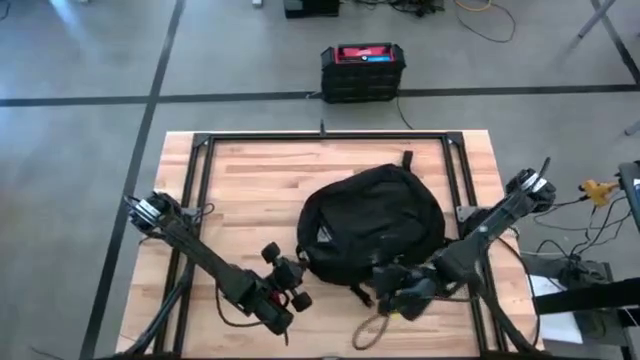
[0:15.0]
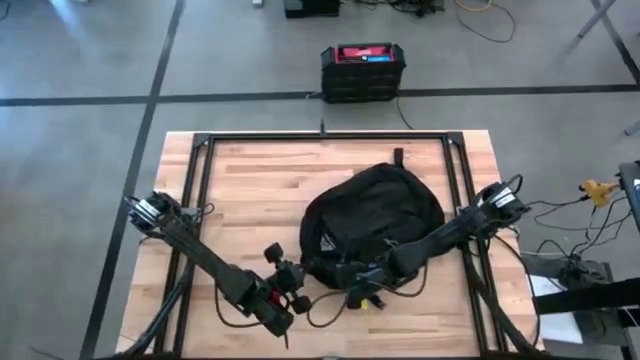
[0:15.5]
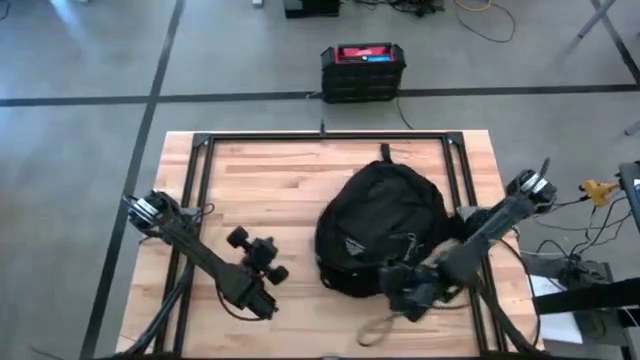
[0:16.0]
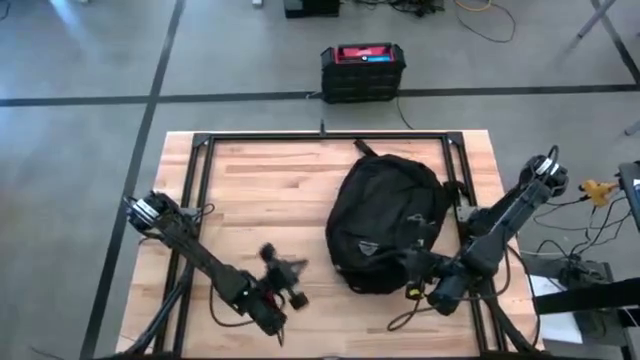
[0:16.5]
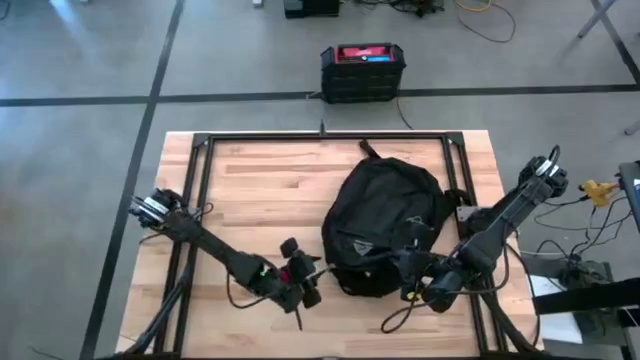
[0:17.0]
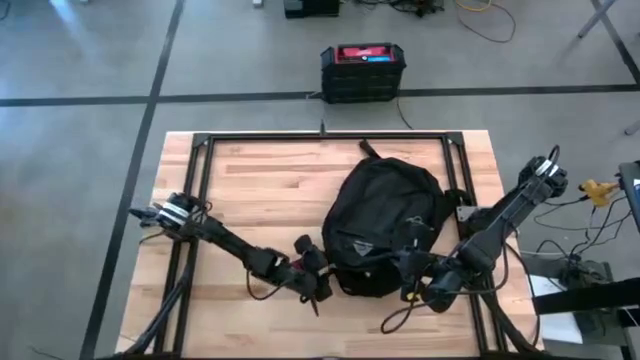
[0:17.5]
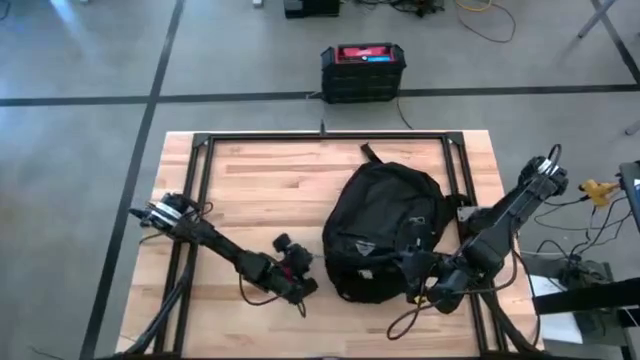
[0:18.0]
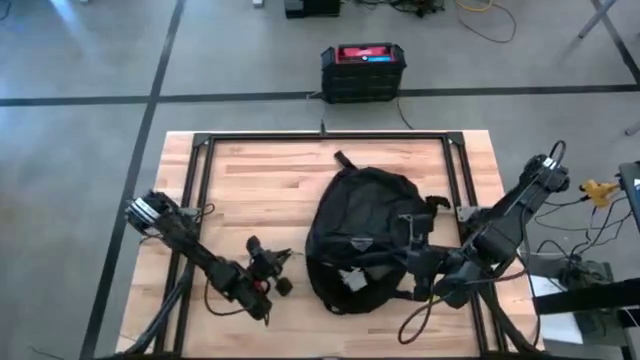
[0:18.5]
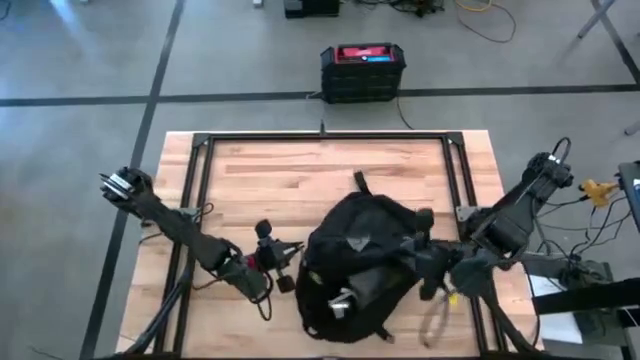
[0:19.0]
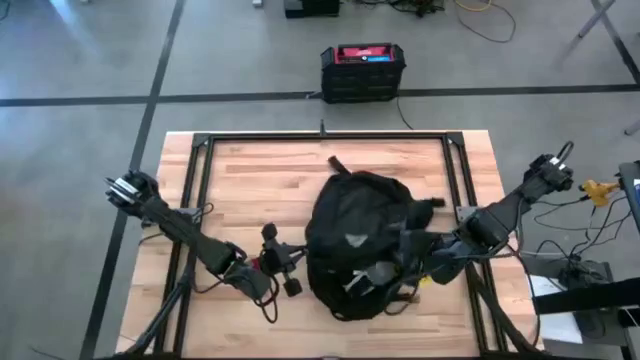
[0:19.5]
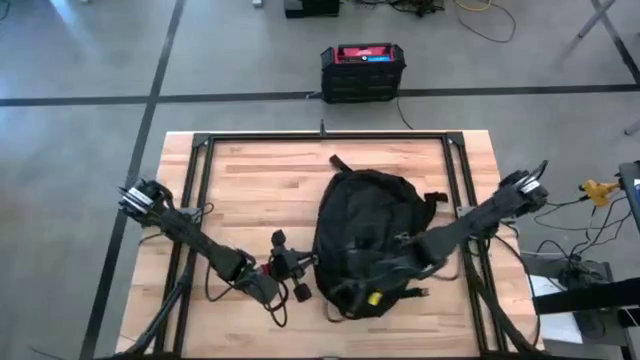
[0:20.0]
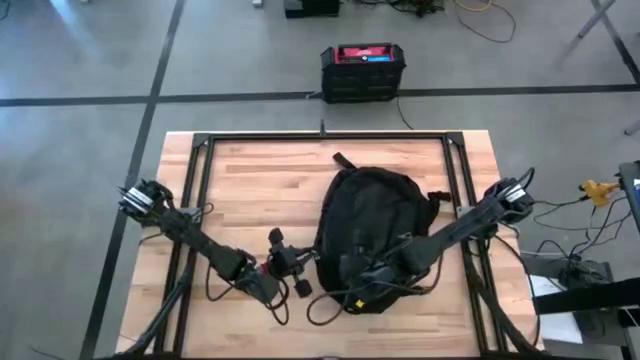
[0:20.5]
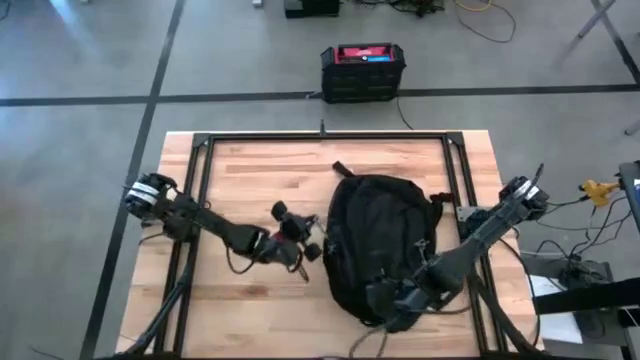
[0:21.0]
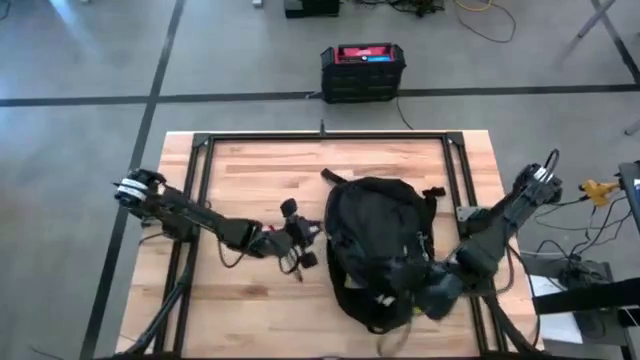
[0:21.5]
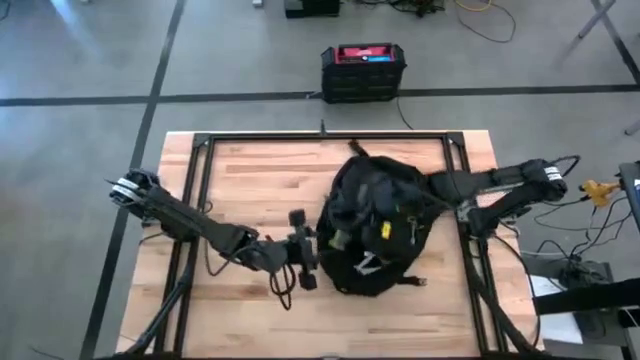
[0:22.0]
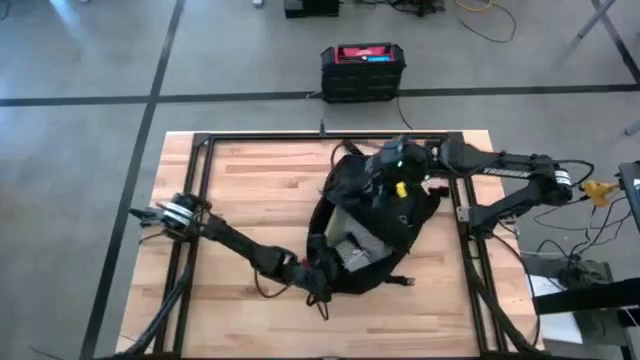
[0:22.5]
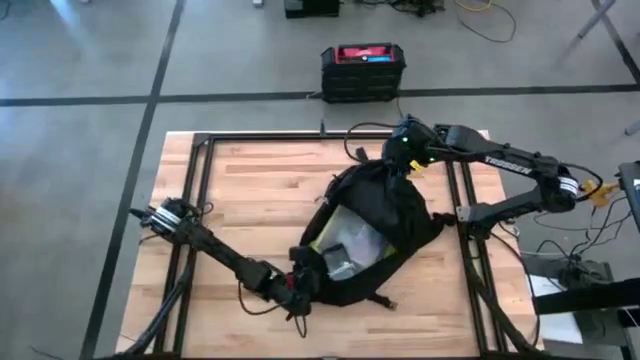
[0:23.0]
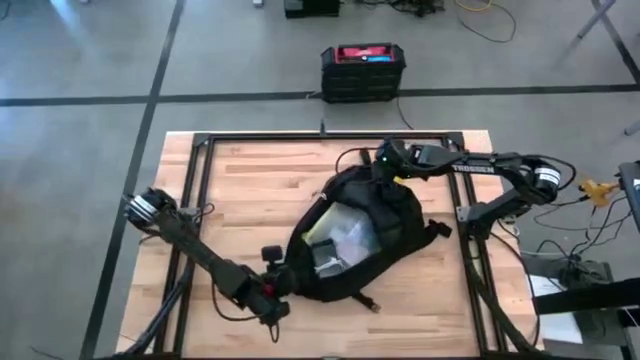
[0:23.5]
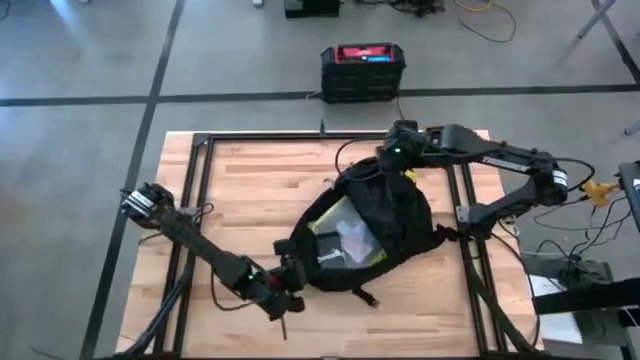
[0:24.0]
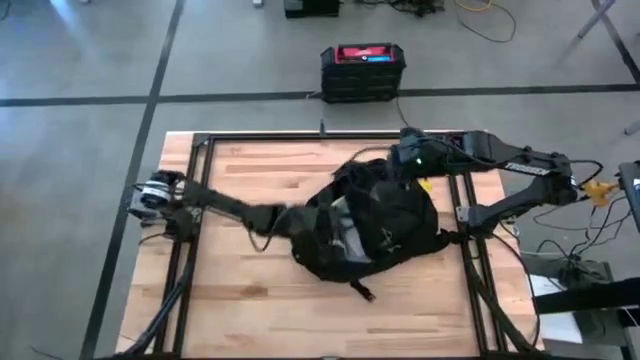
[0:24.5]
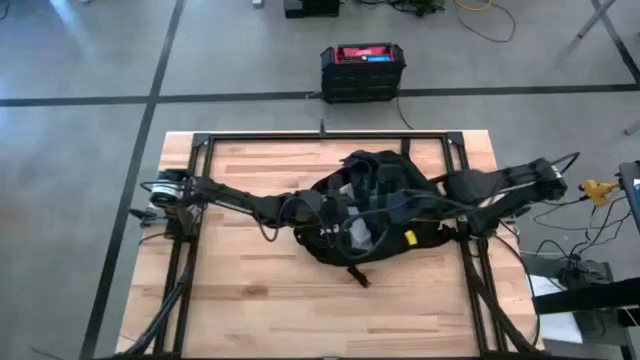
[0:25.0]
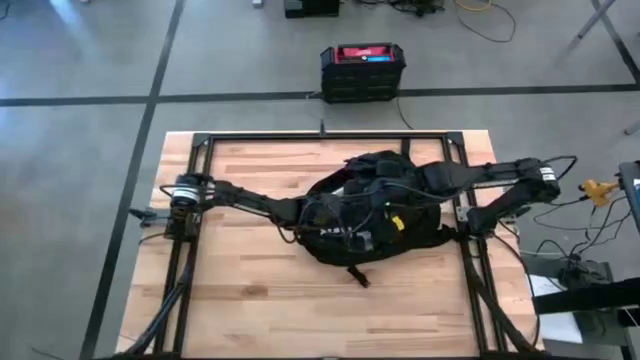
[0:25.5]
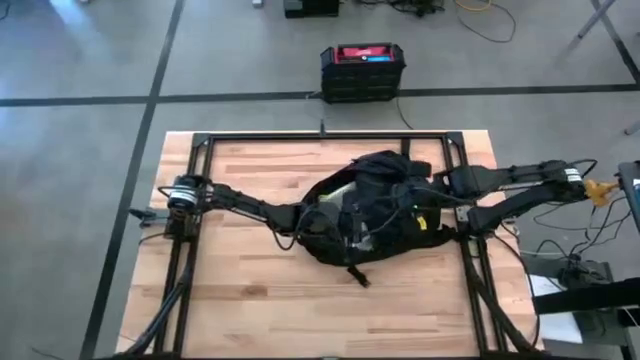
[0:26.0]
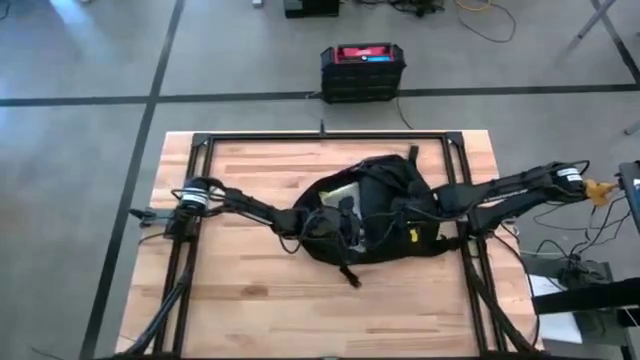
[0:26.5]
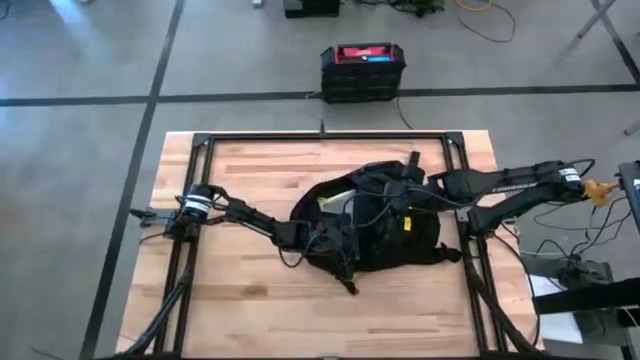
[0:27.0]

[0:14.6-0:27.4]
Task: Unpack backpack
Open the black backpack

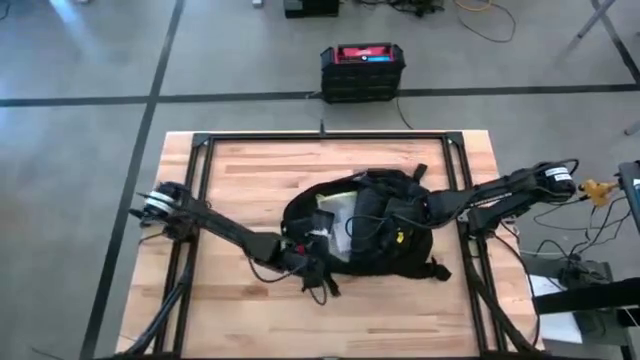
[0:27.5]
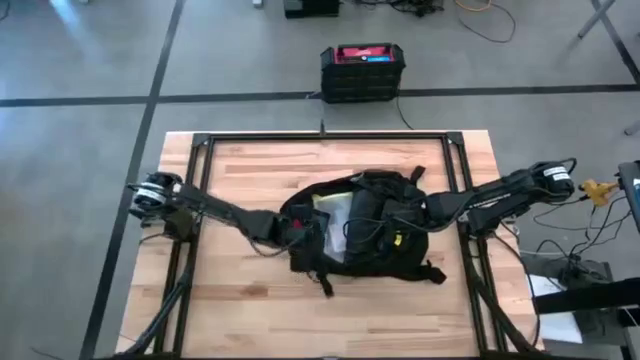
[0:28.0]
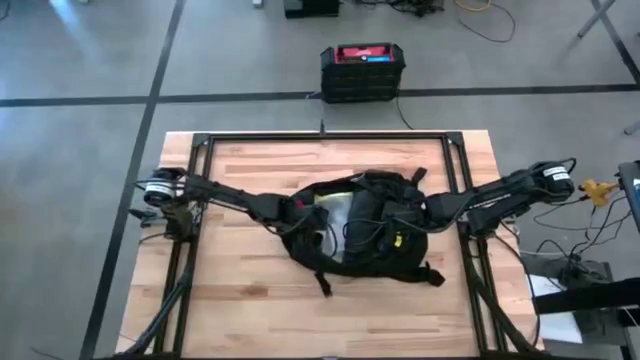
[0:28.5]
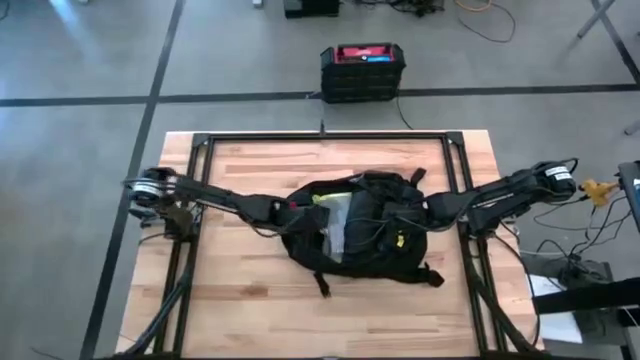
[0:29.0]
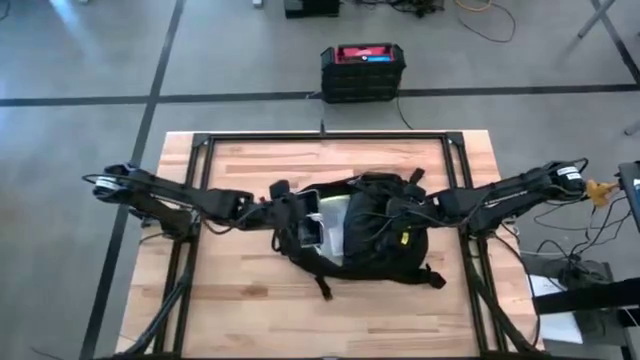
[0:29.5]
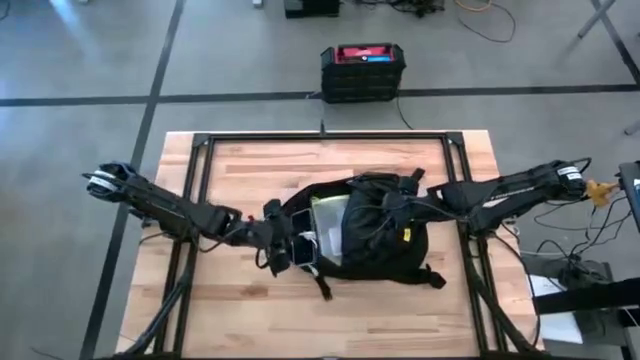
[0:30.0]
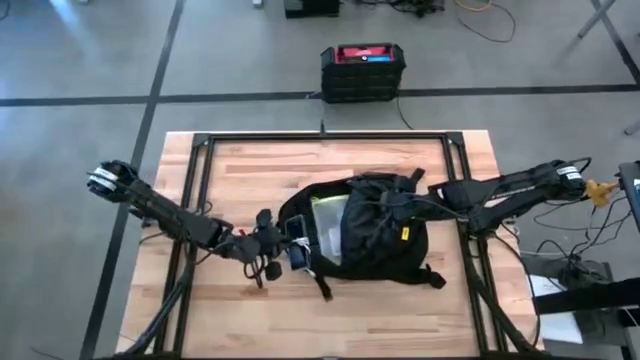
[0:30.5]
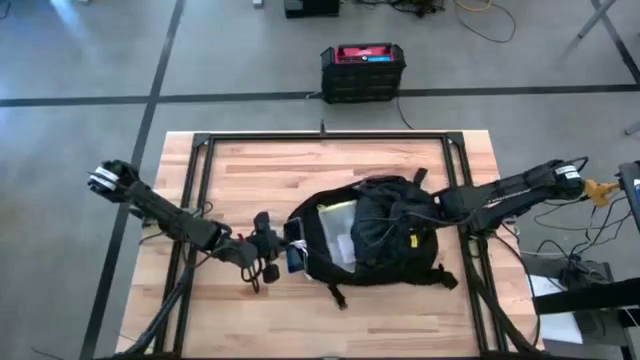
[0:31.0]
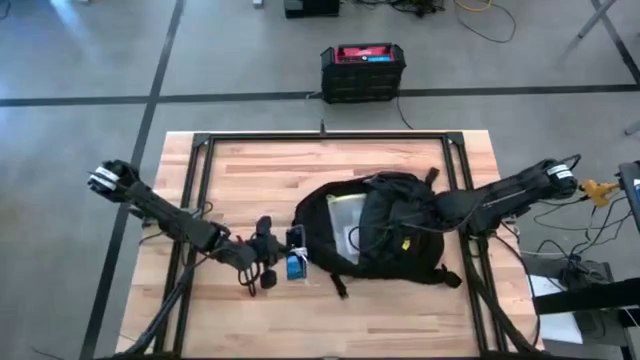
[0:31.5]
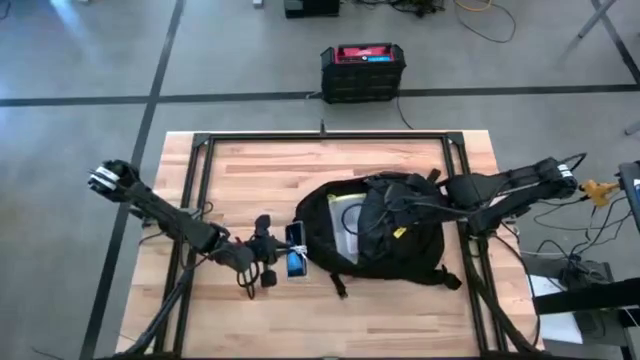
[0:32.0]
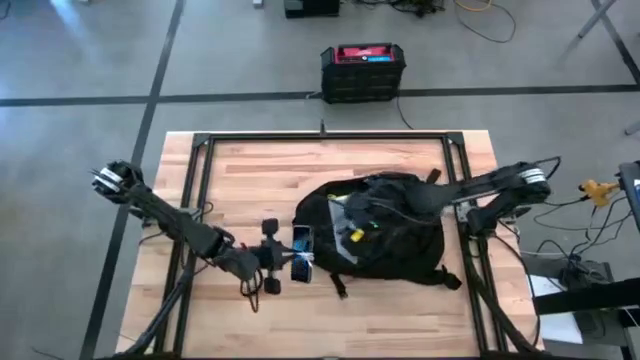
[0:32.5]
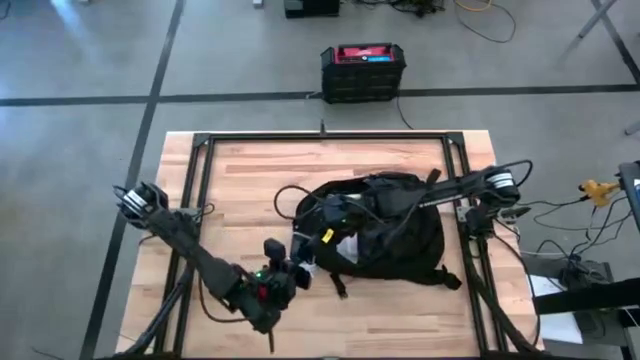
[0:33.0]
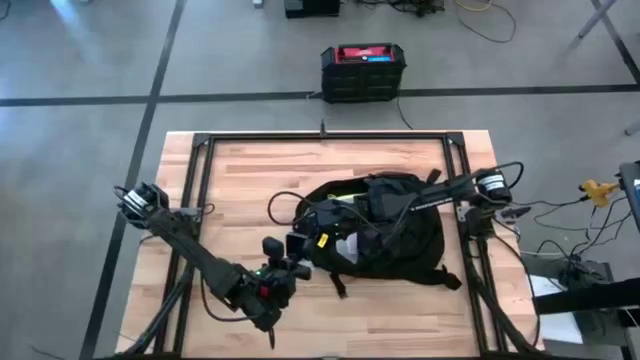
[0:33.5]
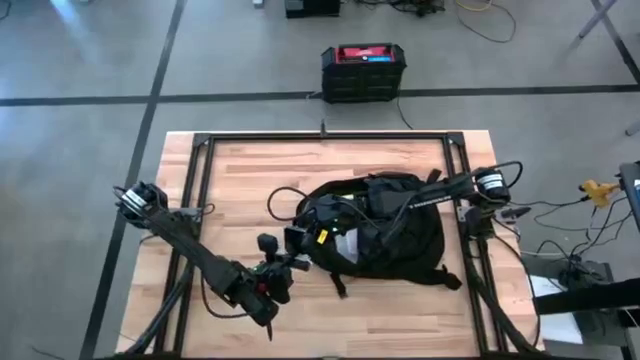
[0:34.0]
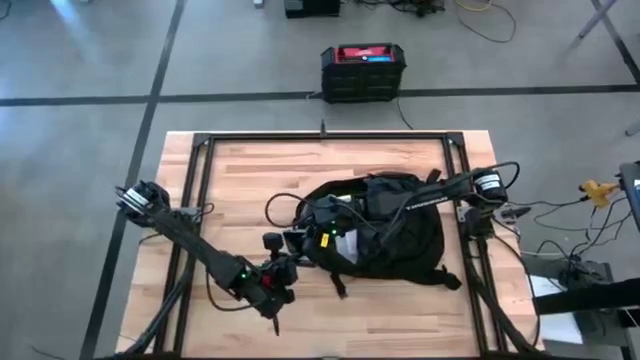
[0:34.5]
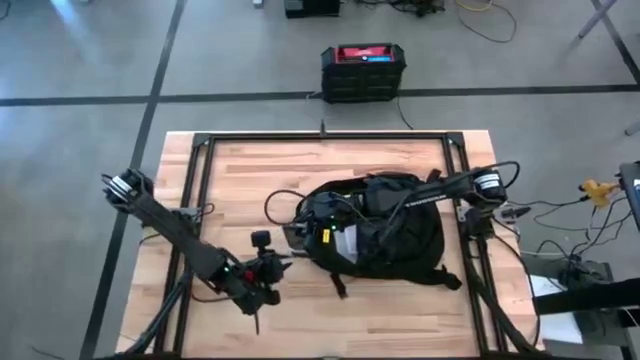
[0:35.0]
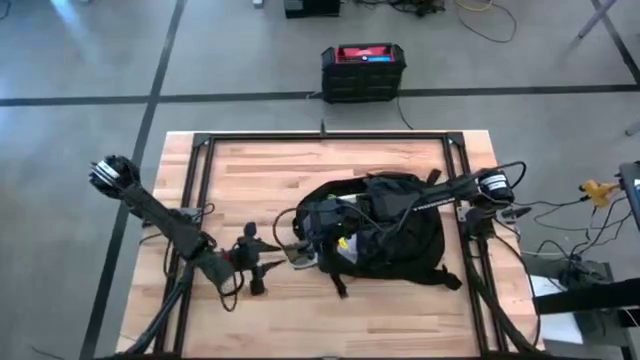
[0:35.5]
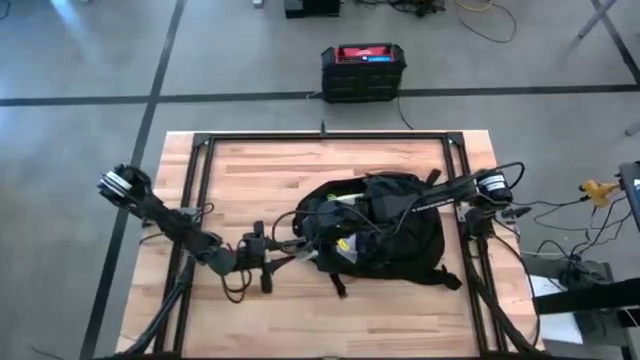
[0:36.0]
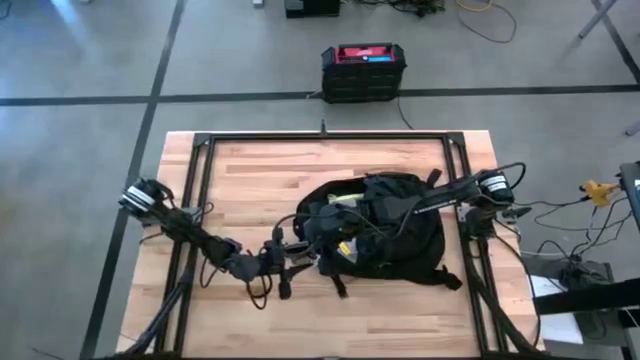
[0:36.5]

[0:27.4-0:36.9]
Remove the white charger cable from the black phone
